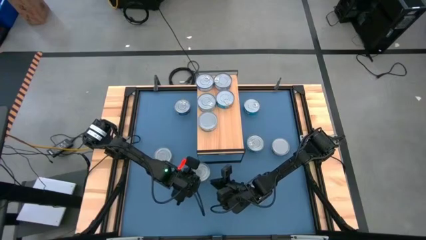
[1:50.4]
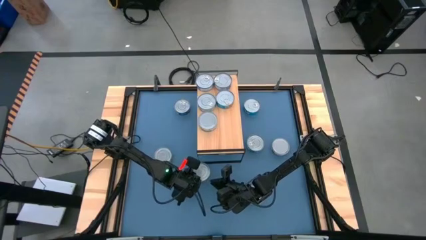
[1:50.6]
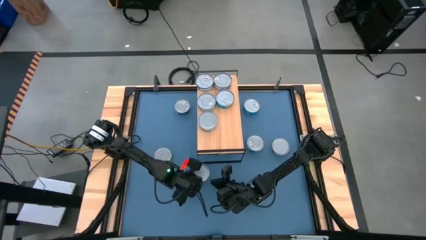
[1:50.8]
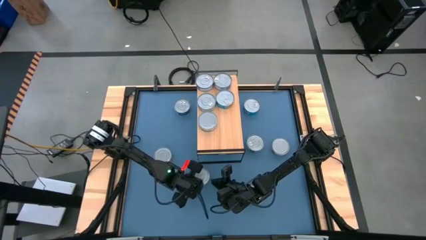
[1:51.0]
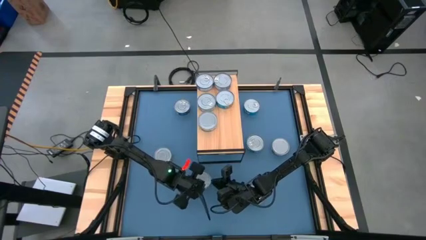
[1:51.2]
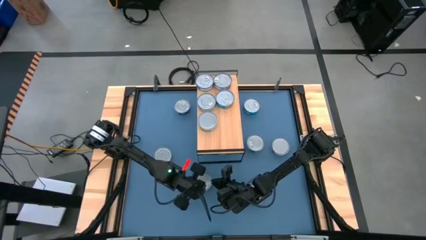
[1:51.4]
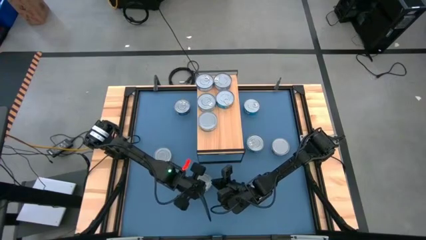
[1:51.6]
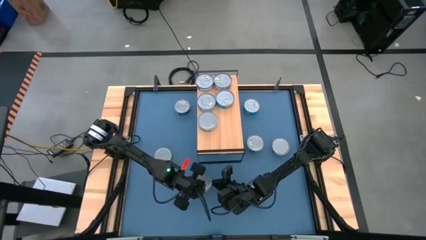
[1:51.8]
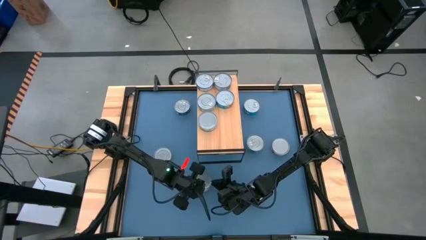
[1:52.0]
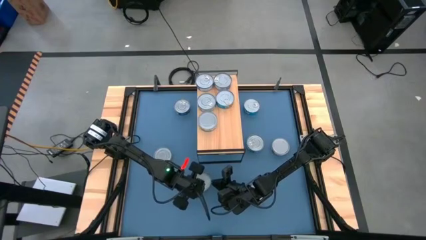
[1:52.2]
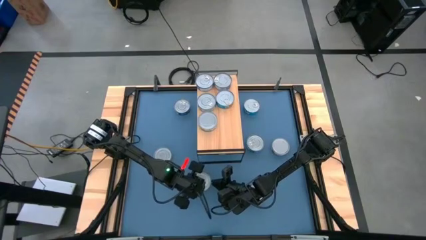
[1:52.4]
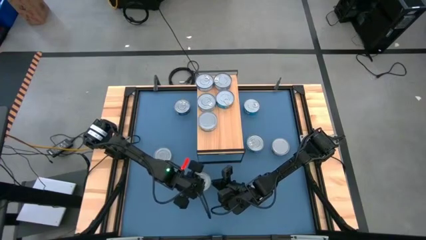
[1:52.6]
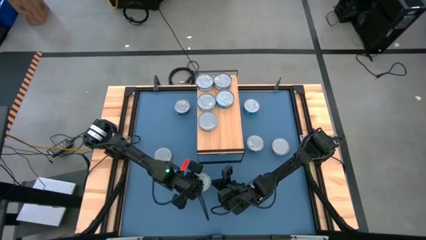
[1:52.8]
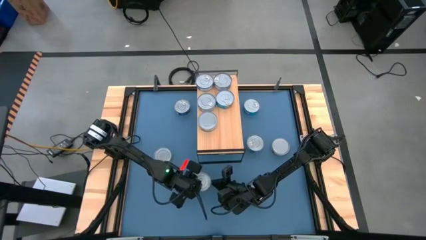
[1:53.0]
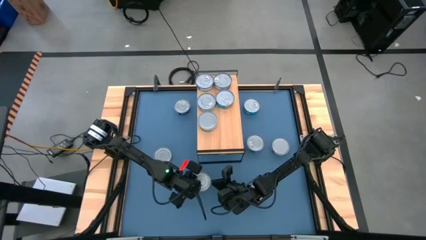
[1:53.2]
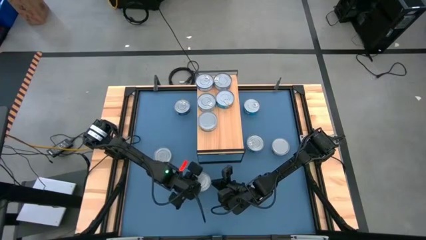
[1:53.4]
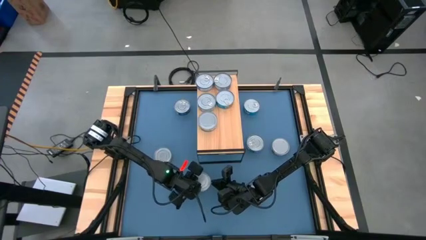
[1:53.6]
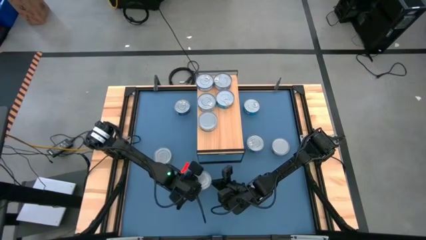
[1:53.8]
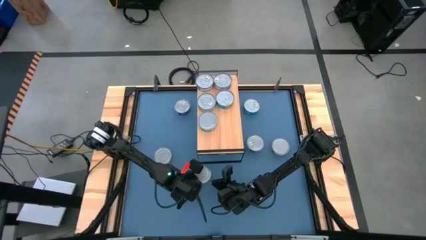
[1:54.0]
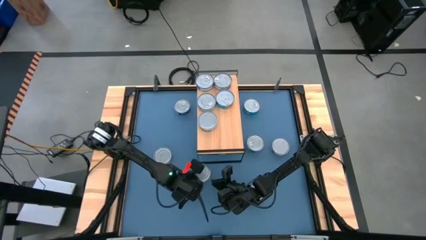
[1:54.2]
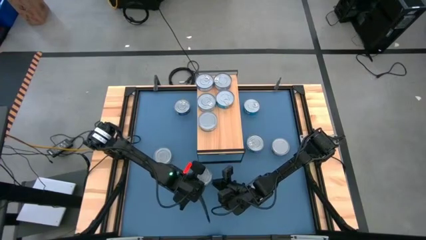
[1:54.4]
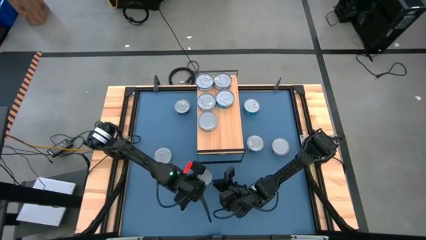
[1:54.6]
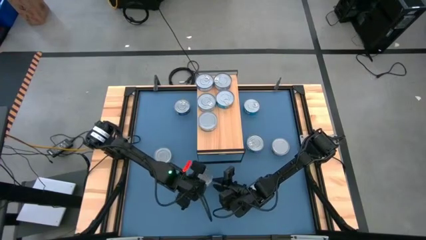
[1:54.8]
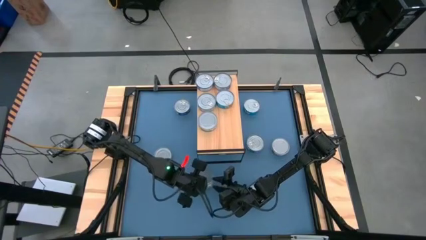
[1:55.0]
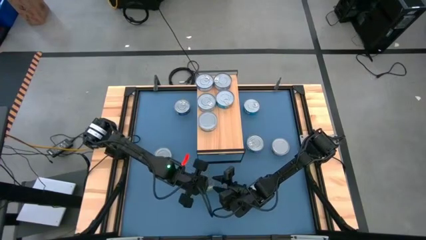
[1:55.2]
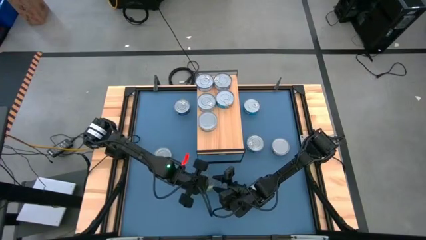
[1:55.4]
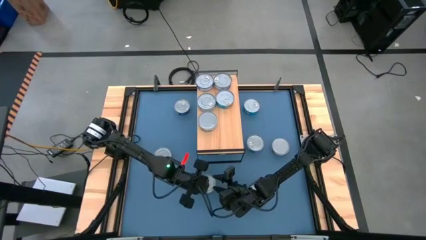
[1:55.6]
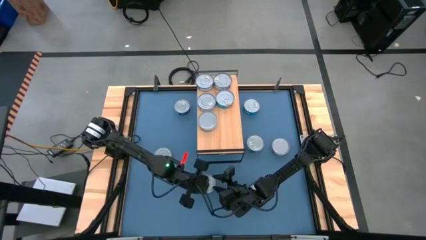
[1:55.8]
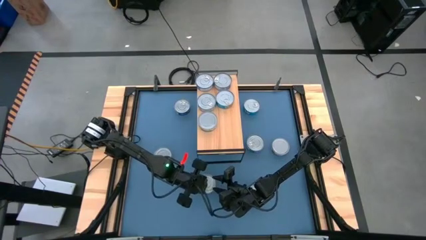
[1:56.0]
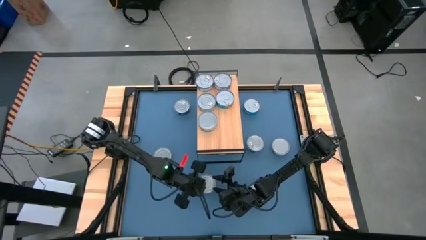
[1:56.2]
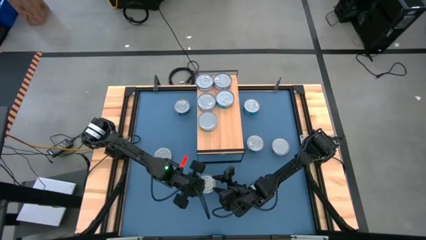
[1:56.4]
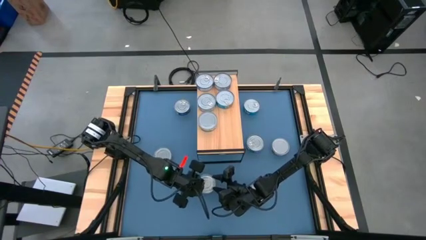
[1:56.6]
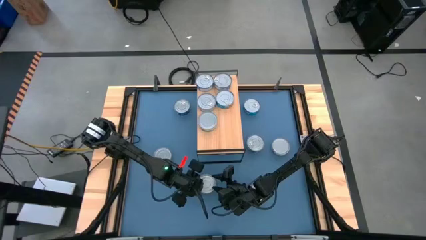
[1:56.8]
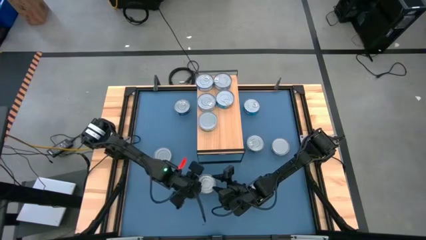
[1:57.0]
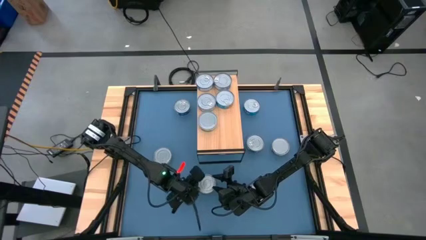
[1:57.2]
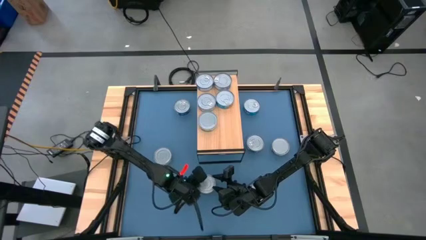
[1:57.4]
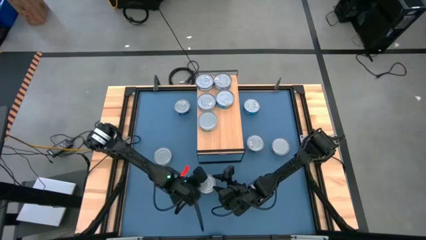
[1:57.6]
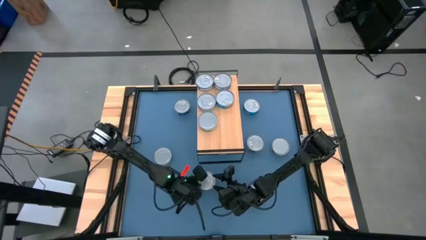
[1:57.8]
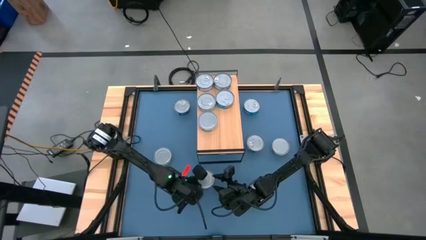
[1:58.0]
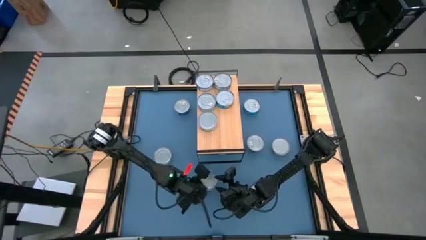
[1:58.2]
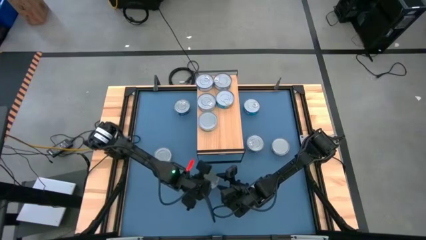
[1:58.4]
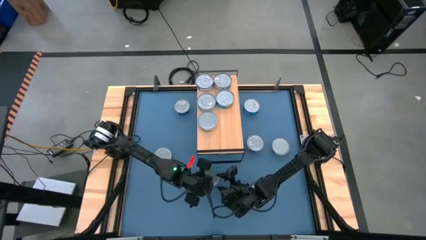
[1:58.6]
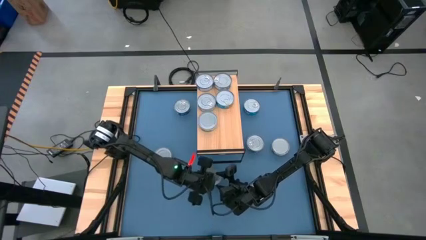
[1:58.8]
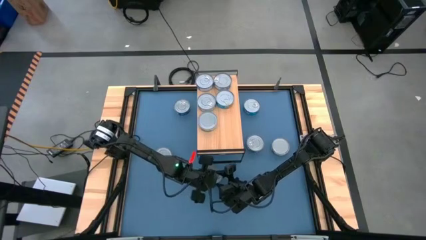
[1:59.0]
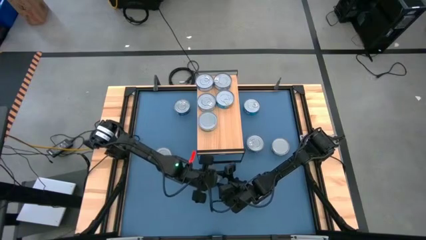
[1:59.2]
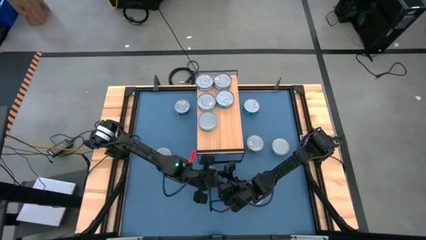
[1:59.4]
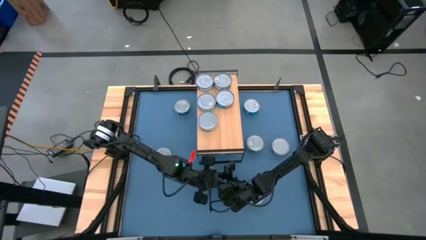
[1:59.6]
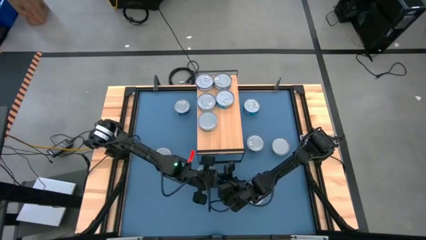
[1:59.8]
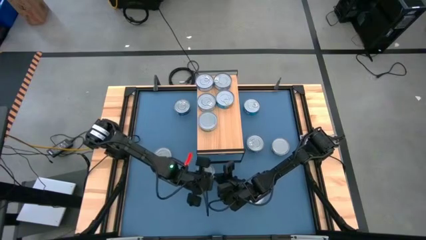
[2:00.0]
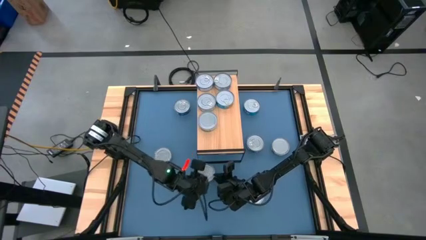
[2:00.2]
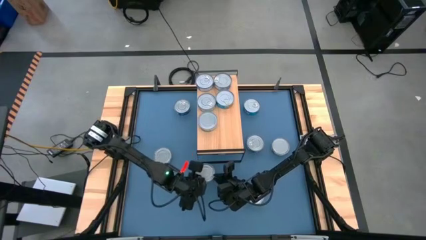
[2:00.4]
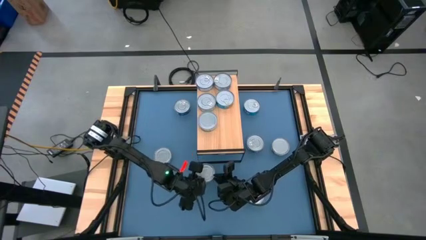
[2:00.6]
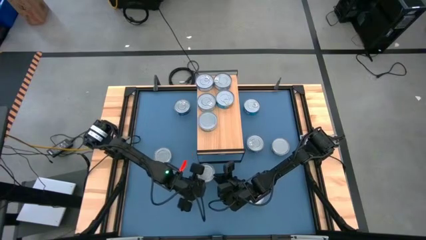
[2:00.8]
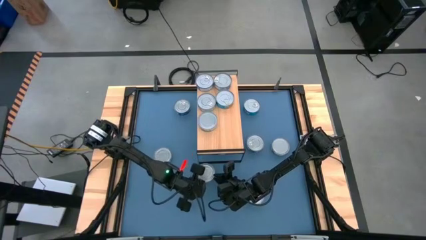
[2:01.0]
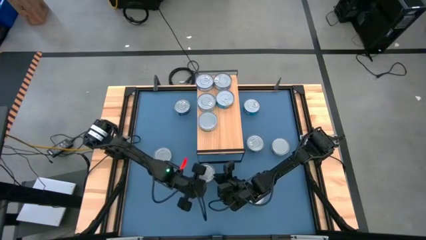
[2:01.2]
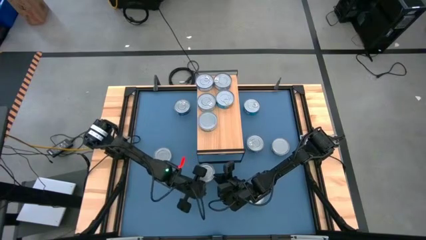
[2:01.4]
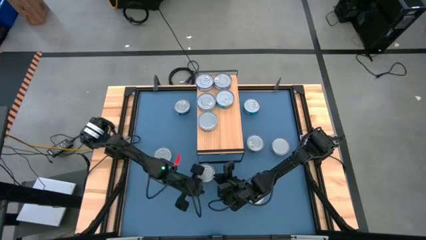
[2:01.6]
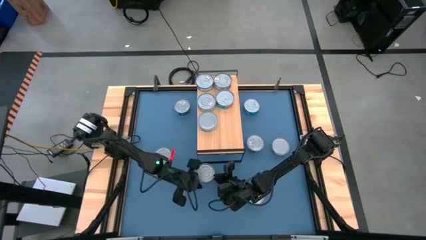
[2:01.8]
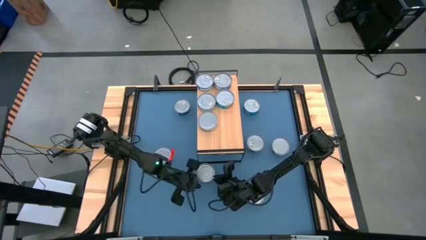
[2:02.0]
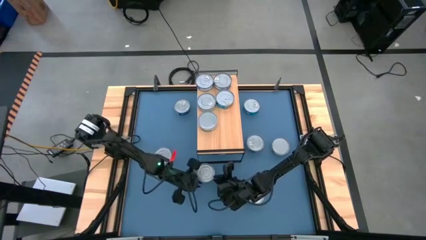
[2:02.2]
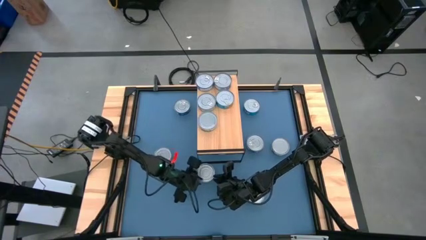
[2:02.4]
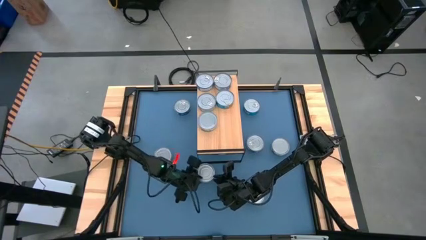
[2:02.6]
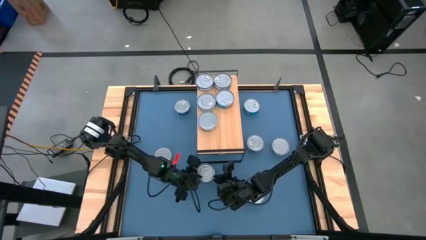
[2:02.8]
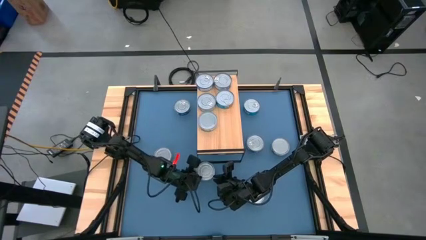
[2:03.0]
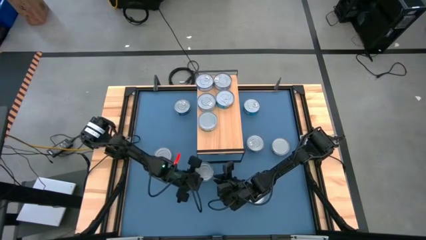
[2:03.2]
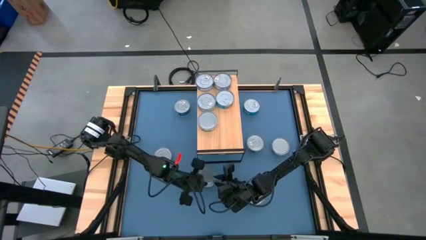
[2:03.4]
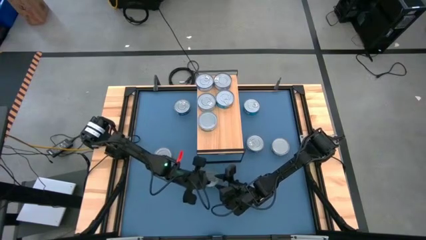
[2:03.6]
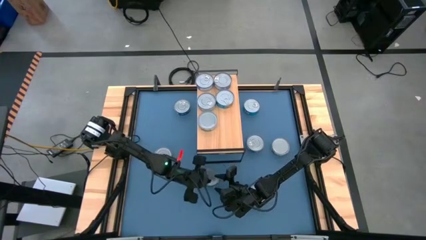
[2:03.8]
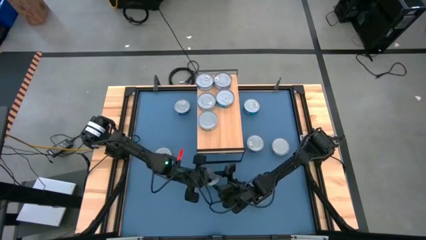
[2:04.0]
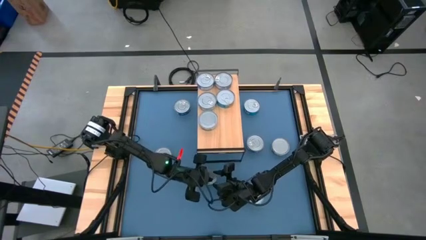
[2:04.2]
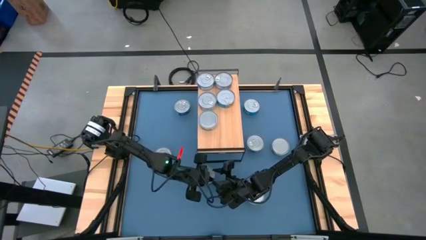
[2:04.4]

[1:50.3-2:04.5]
Task: Stack canned seafood by type on shelf
Put the green tuna can on the shelf

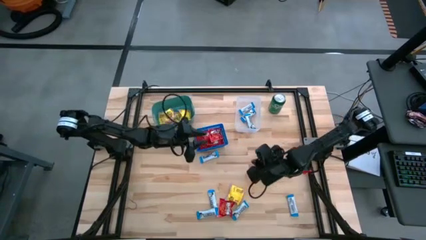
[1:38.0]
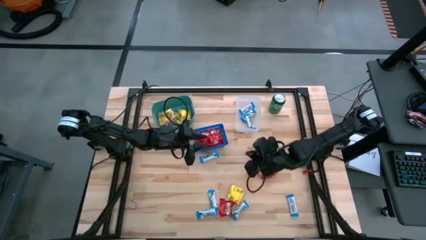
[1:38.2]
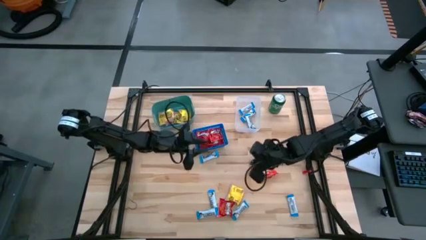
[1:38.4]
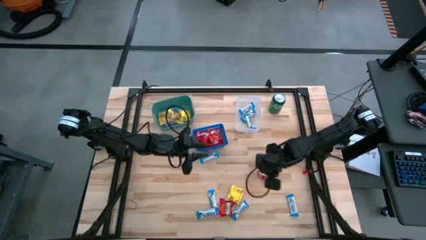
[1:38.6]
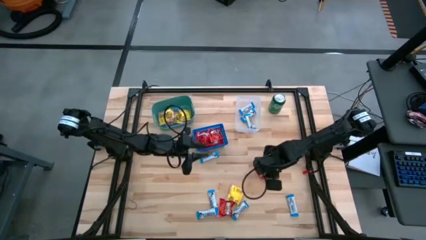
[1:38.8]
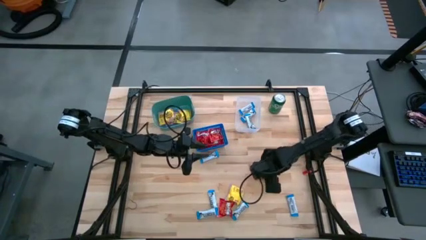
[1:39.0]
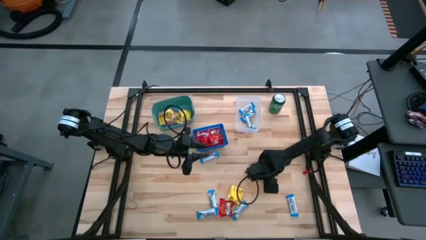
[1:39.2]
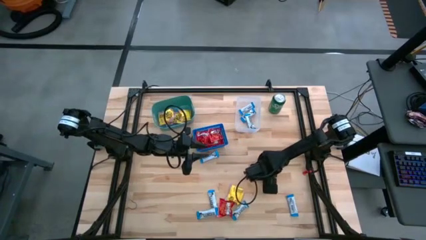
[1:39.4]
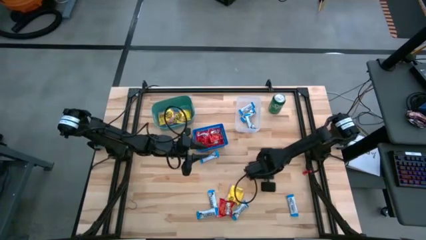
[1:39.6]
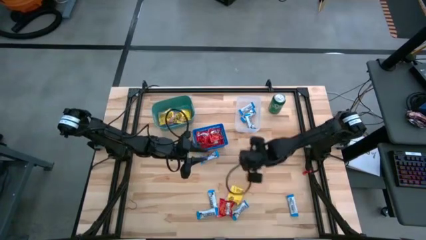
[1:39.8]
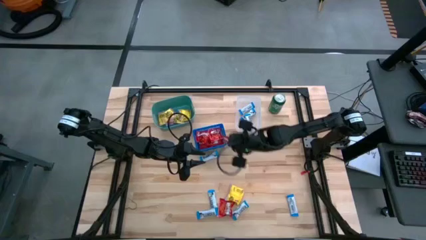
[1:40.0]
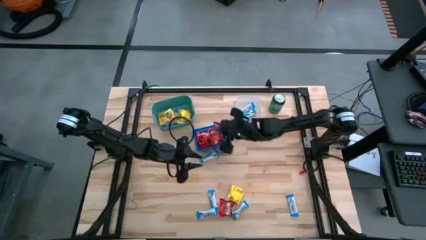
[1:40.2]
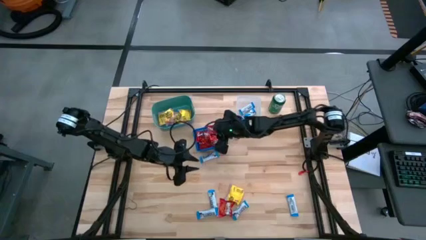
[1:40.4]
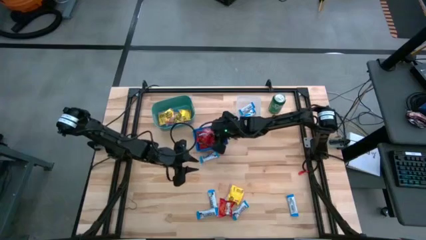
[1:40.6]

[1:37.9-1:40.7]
Task: Sort candy
Put the skittles candy into the blue basket
